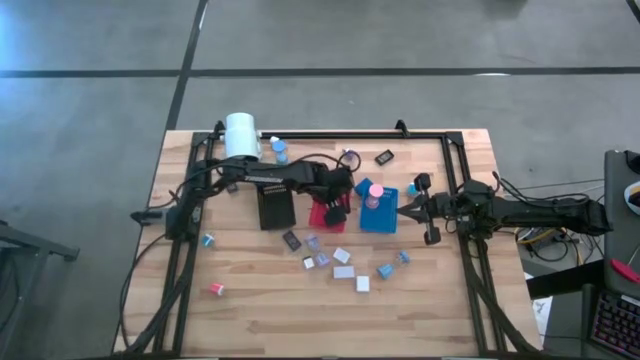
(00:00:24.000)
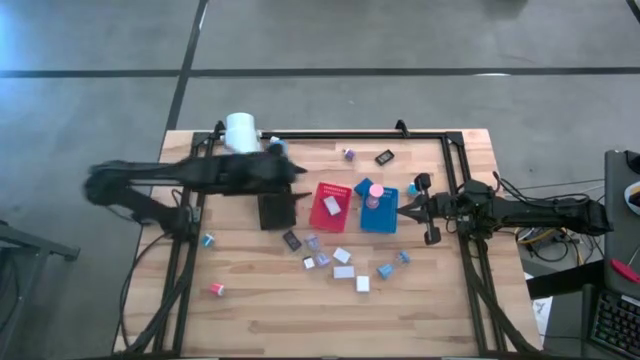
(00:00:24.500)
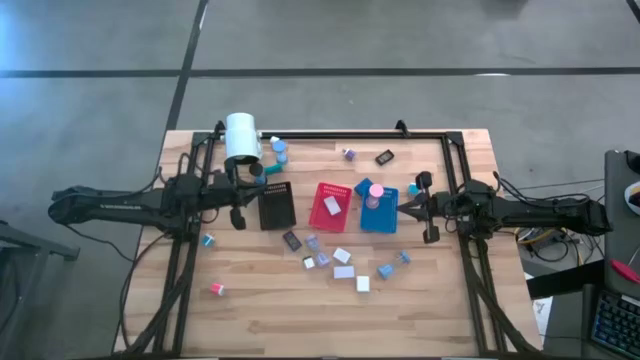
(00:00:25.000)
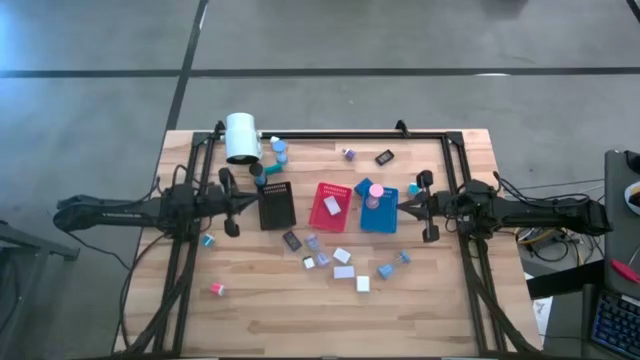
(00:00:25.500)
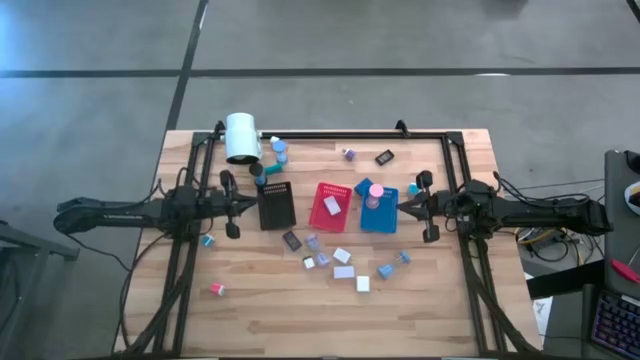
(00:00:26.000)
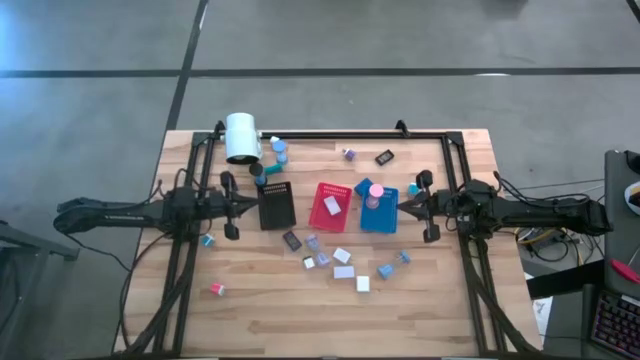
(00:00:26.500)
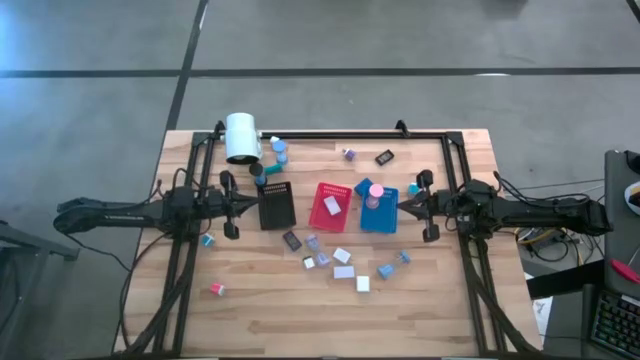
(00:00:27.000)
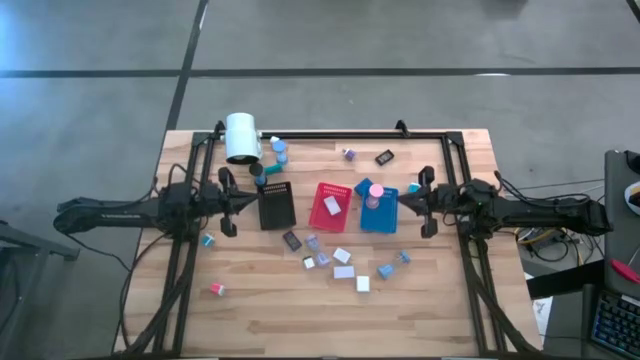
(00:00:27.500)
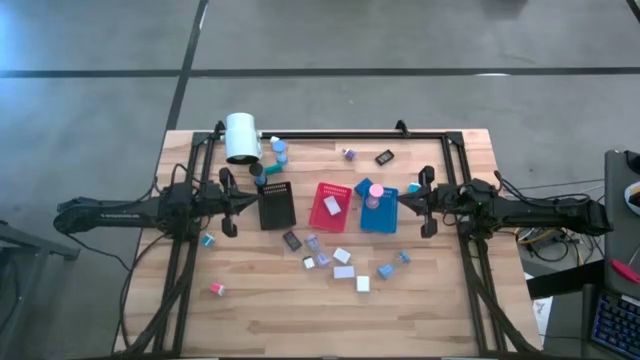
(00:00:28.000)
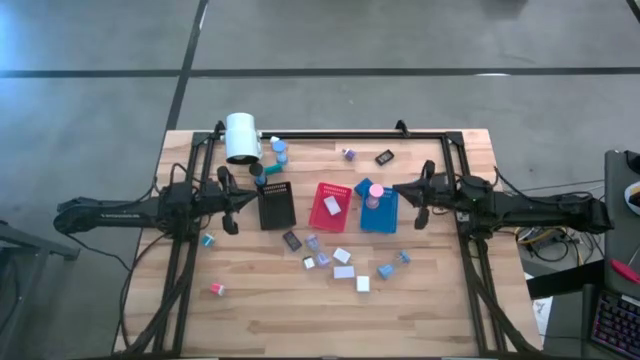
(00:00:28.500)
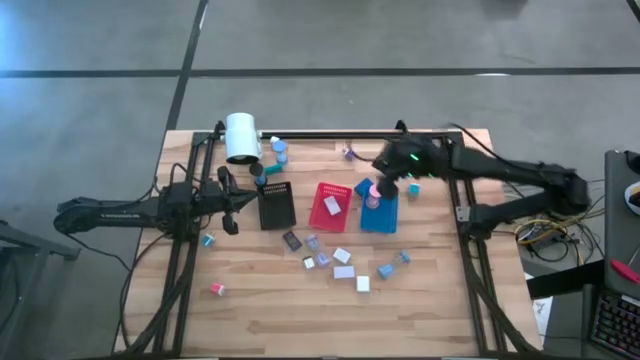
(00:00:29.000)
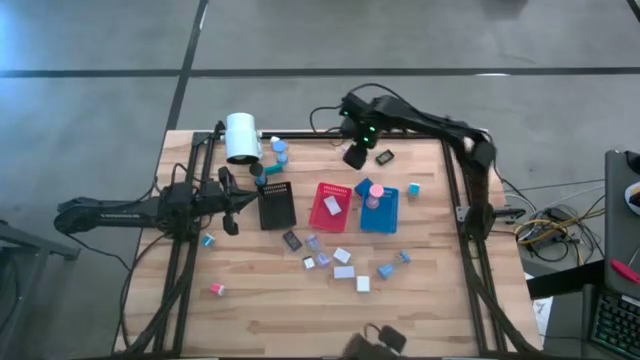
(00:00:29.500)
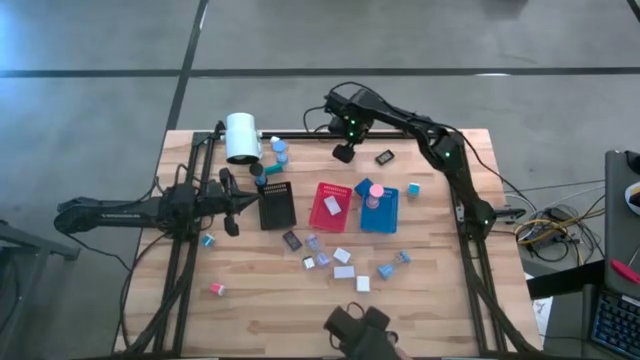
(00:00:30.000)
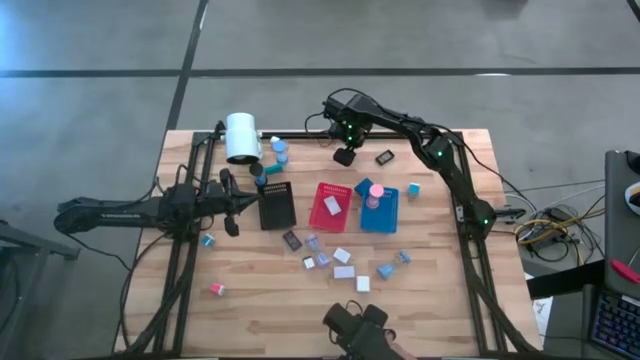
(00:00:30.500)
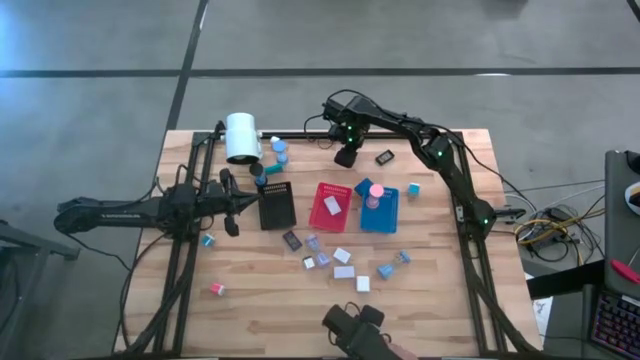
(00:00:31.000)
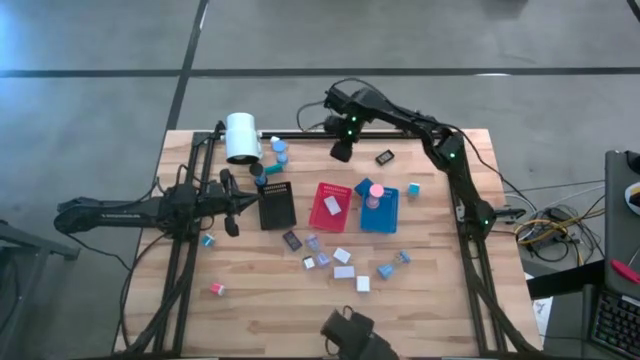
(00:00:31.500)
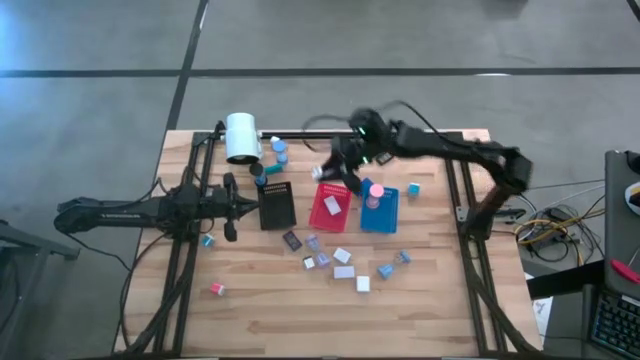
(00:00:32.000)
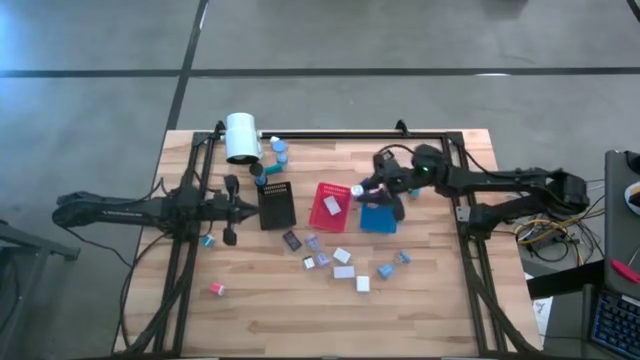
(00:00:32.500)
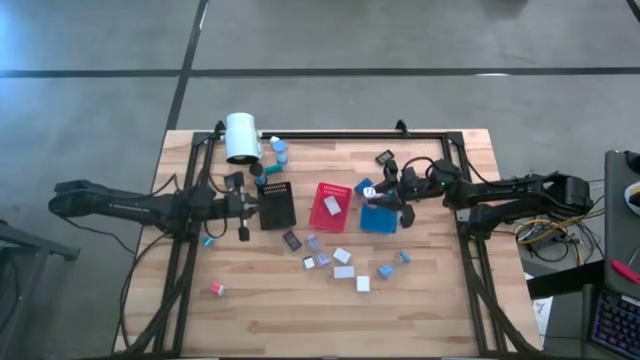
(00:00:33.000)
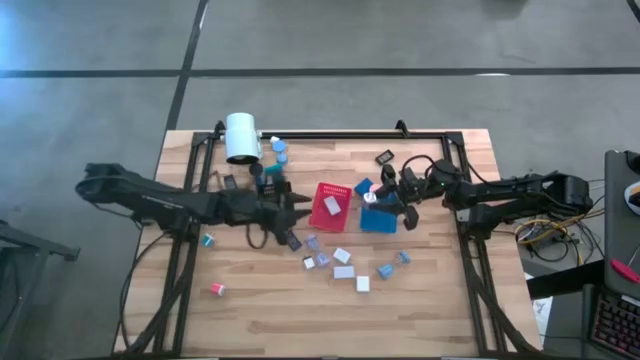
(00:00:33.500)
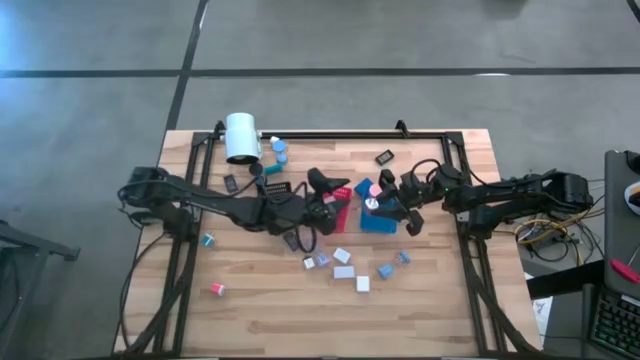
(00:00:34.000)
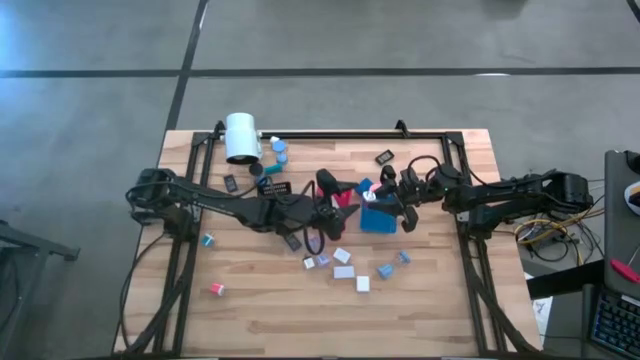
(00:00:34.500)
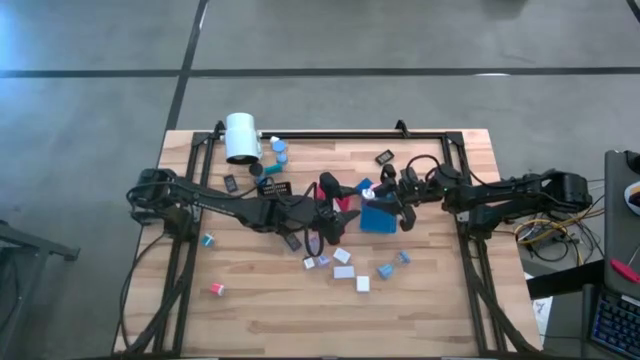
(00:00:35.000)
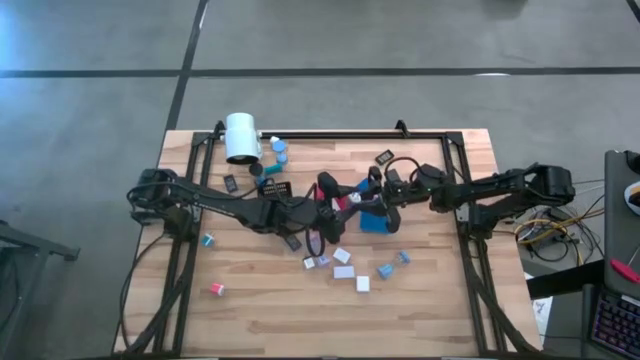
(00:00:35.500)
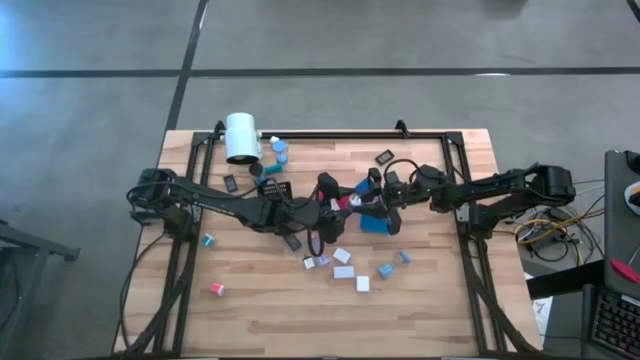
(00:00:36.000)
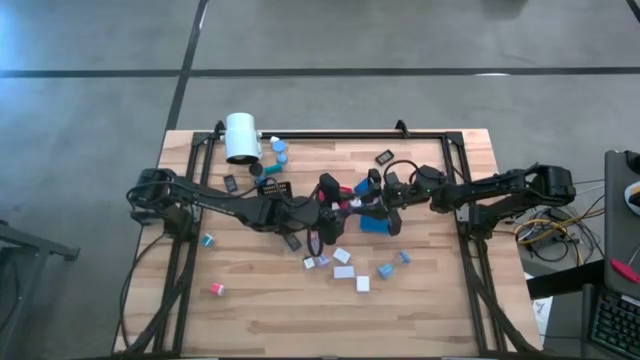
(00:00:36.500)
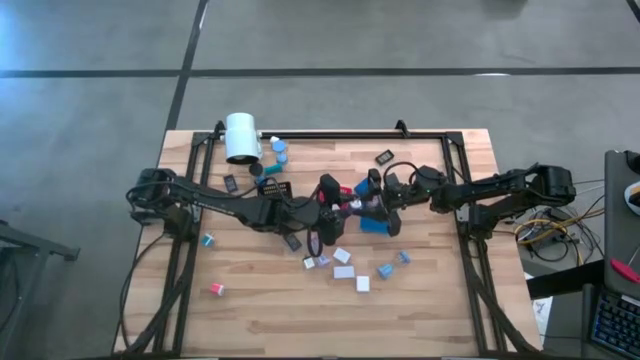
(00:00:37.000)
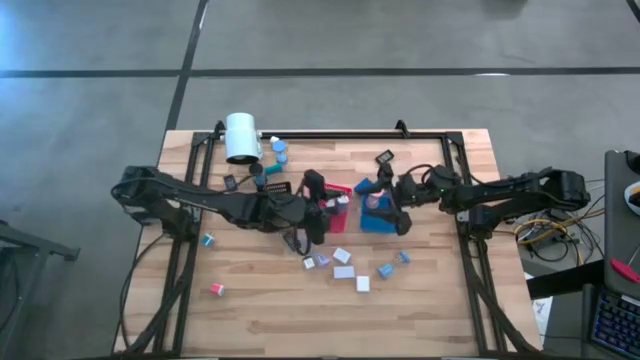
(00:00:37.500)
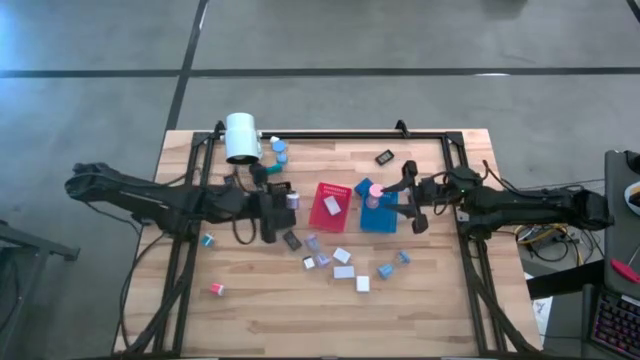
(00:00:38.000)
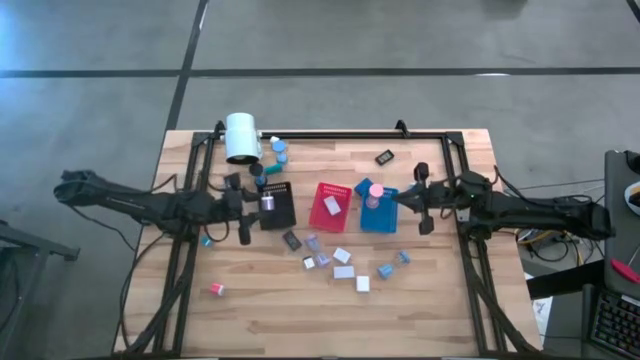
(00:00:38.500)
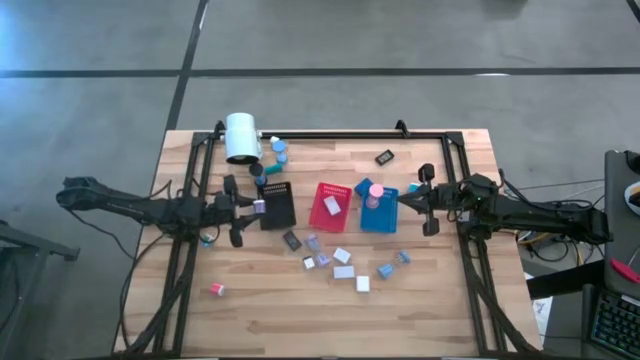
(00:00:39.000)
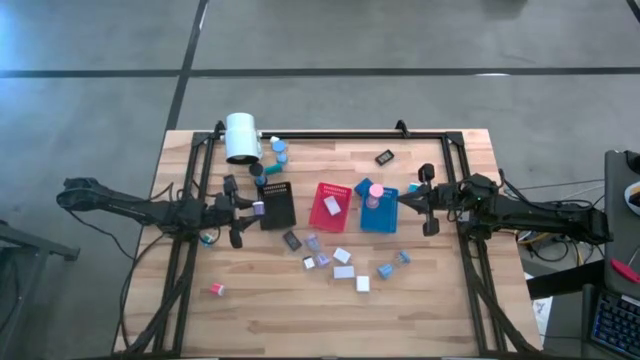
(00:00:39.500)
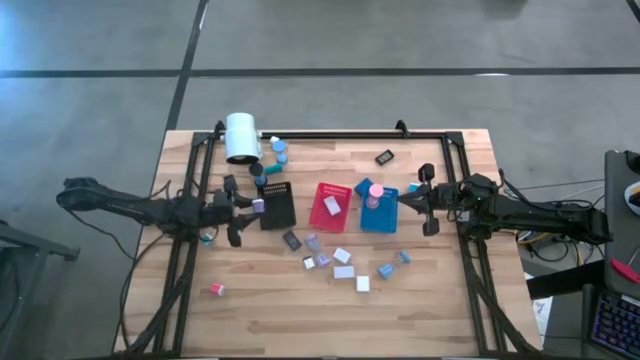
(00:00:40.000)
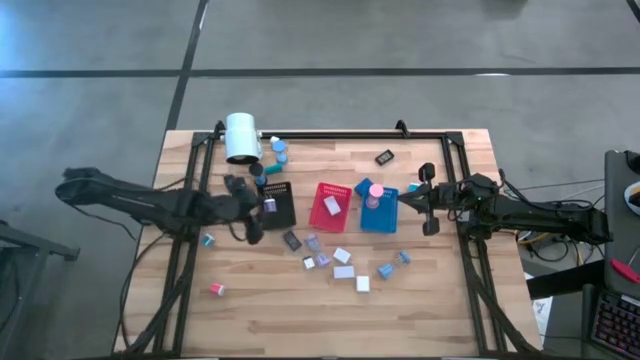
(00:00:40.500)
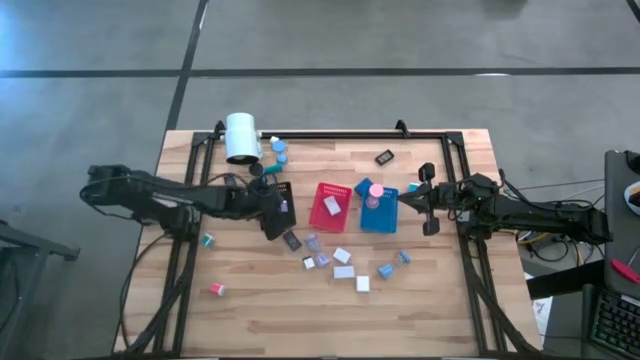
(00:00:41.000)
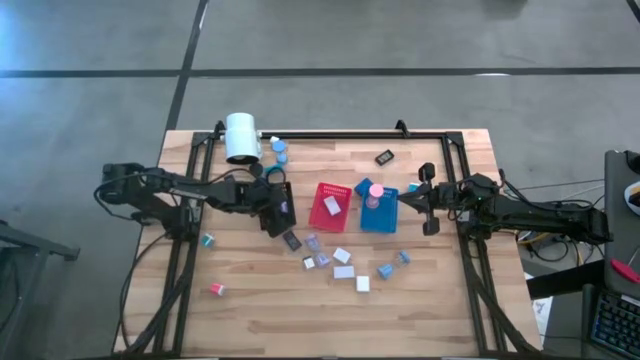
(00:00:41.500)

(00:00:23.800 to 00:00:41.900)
Task: Pick & Place Office items
Put the violet charger adapter into the black bin
